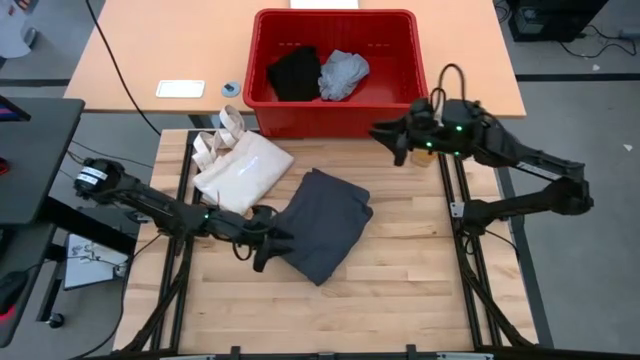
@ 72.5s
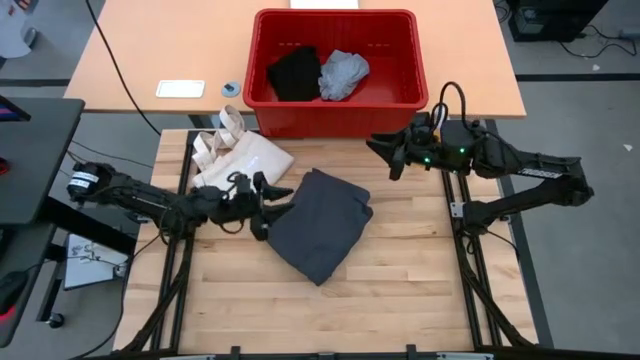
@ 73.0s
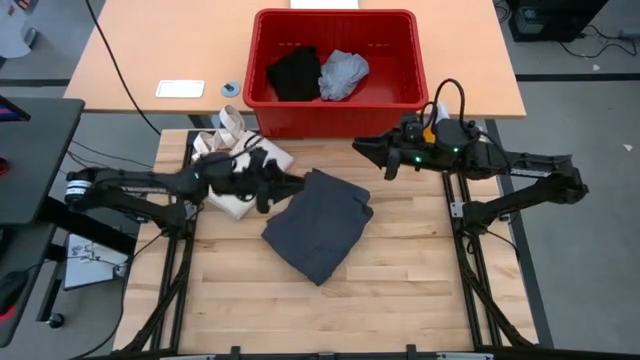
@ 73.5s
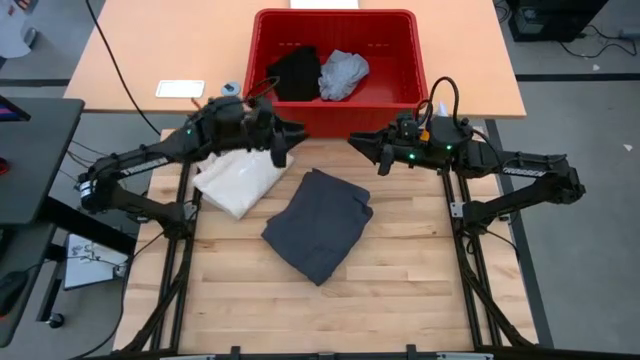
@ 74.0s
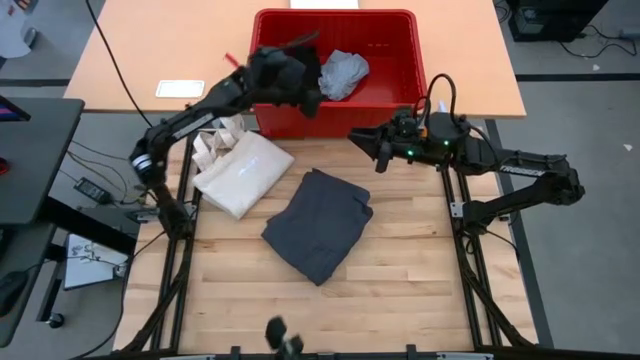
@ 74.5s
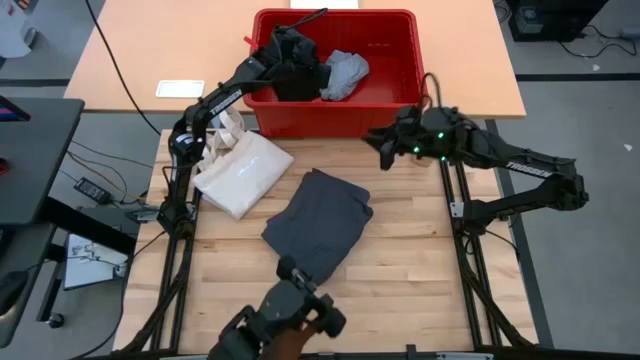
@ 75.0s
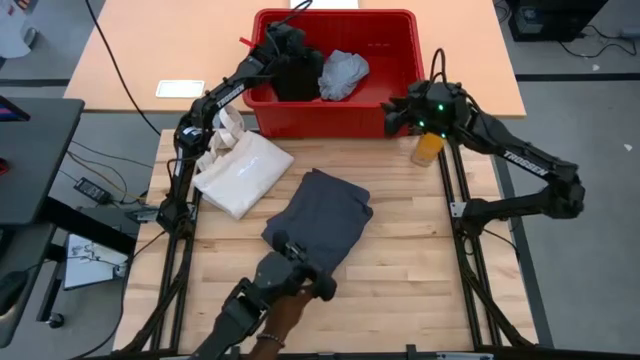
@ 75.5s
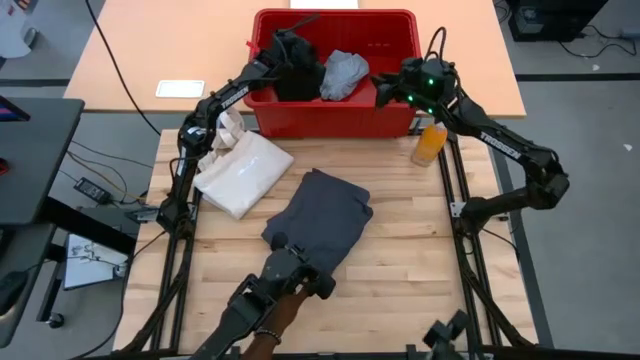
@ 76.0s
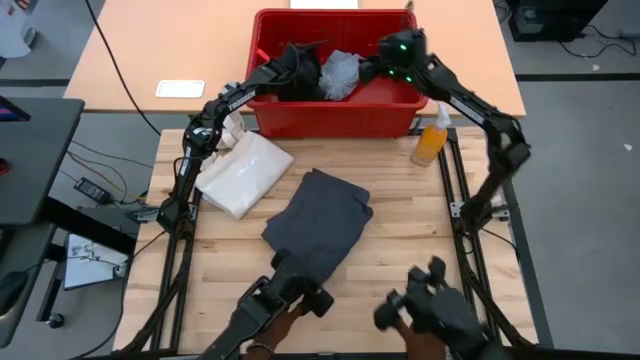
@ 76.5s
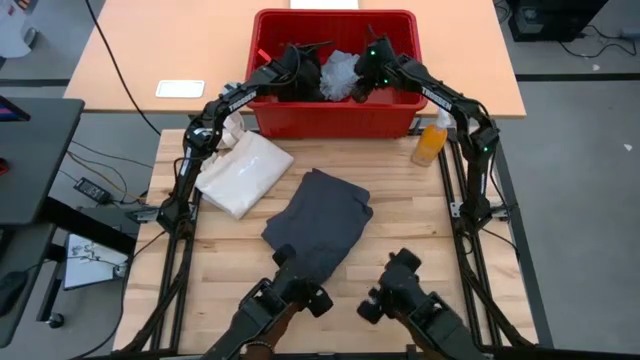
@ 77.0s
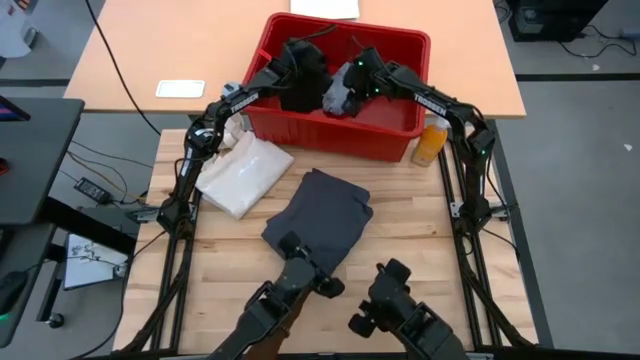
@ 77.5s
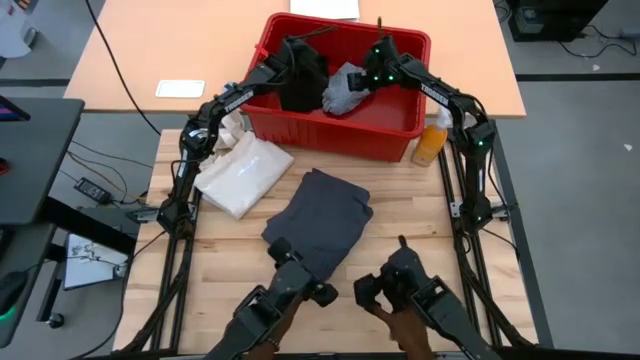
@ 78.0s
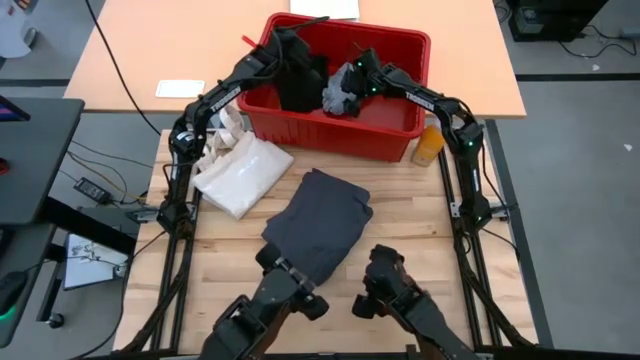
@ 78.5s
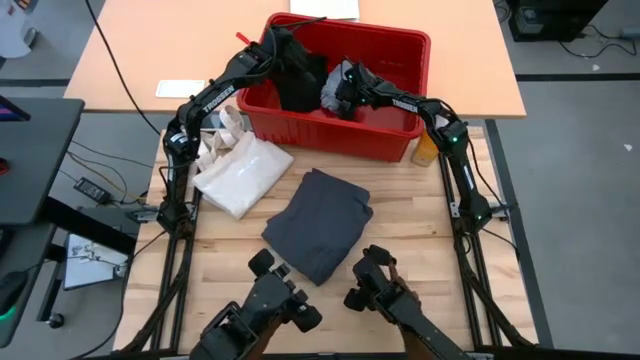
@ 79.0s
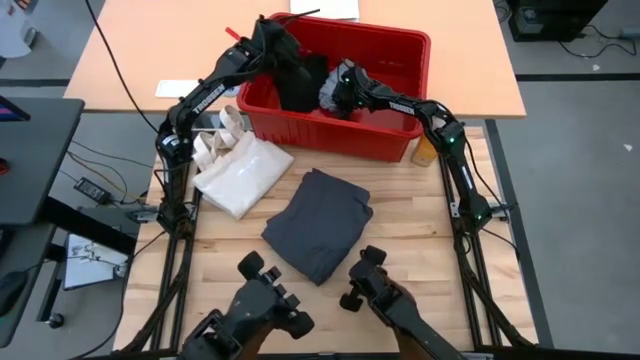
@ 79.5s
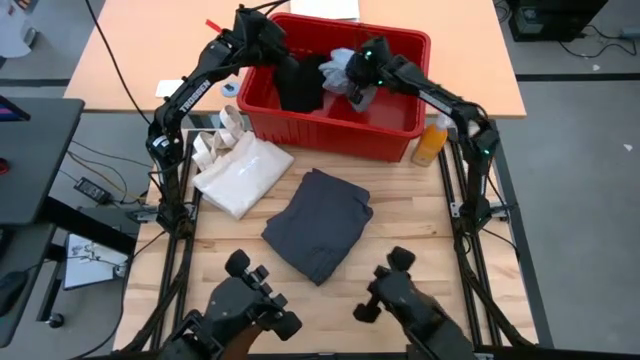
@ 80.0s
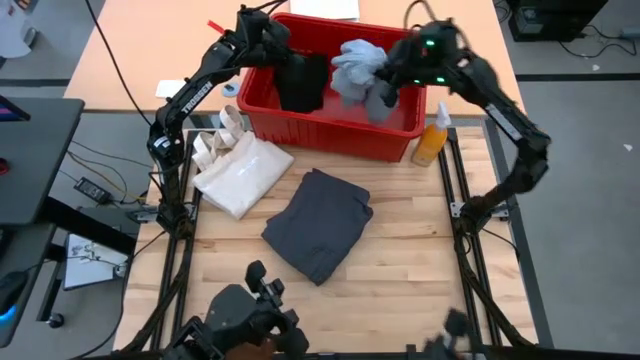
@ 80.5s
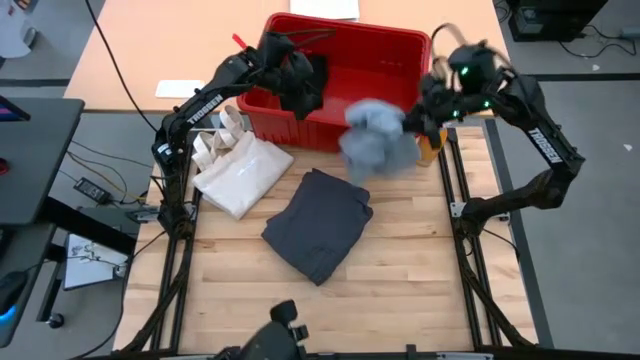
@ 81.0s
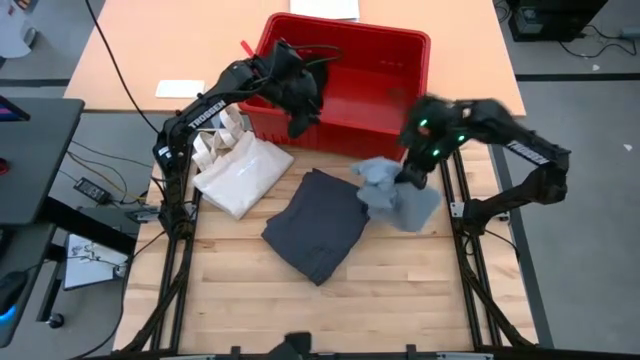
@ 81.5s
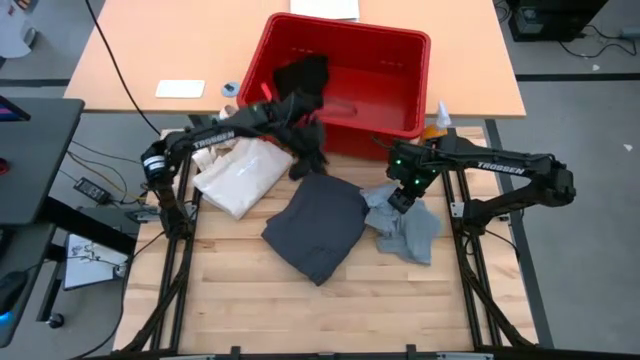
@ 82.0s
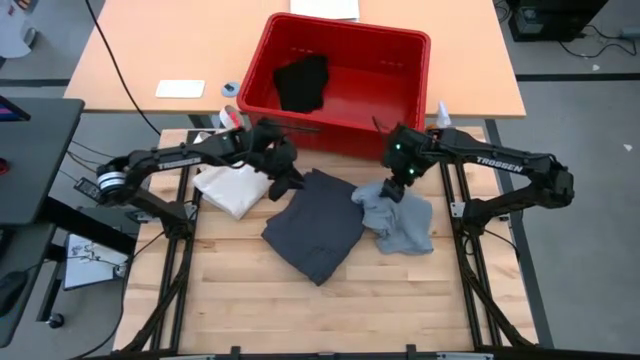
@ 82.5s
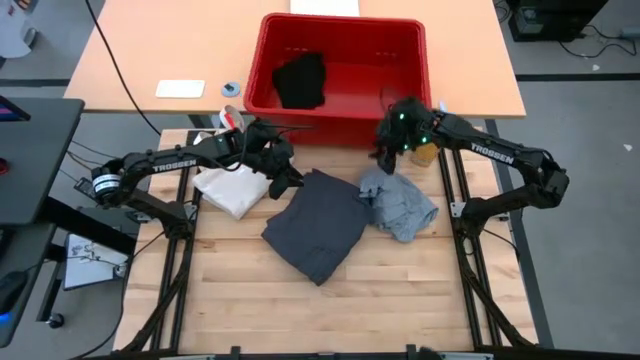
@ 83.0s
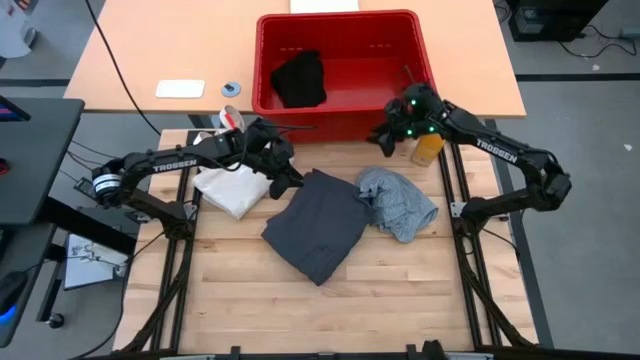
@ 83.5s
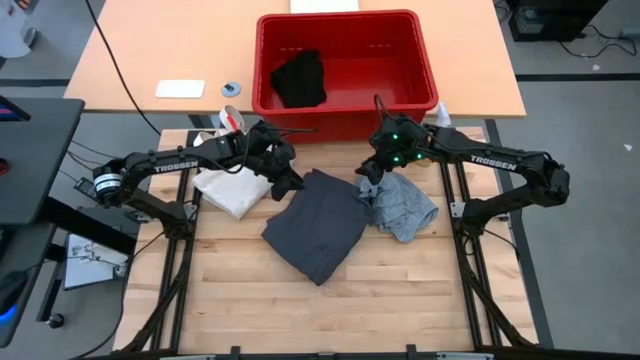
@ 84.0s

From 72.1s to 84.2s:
Task: Fold Laundry from Bin
Remove the light gray t-shirt from the red organizer bin

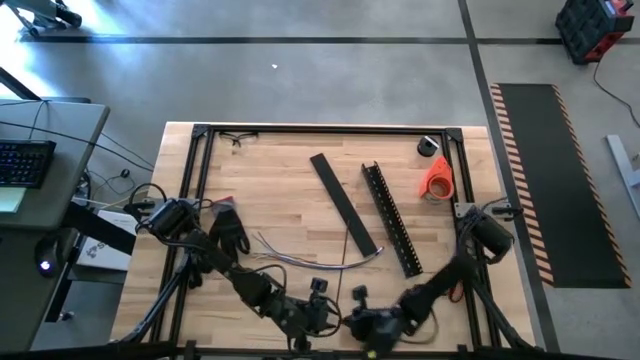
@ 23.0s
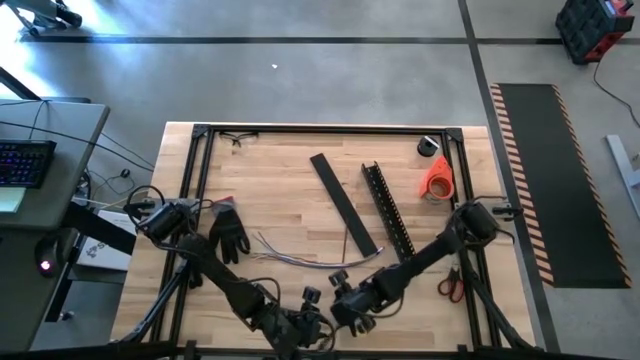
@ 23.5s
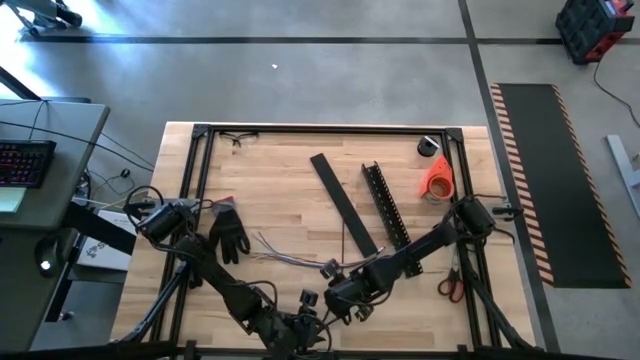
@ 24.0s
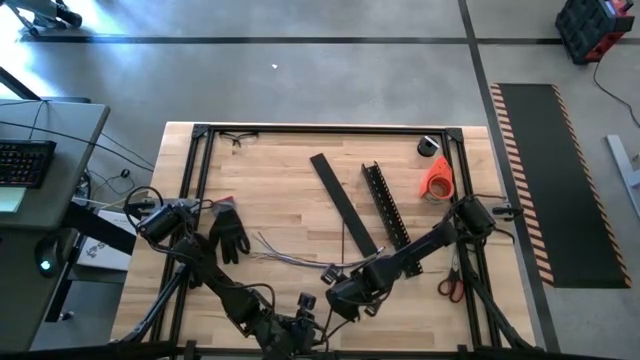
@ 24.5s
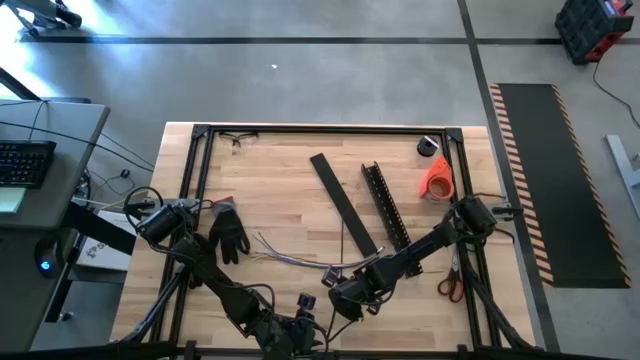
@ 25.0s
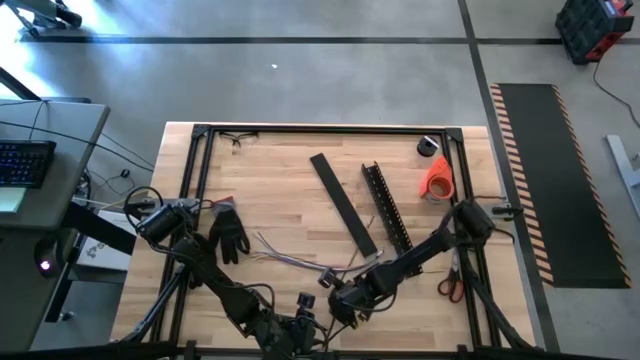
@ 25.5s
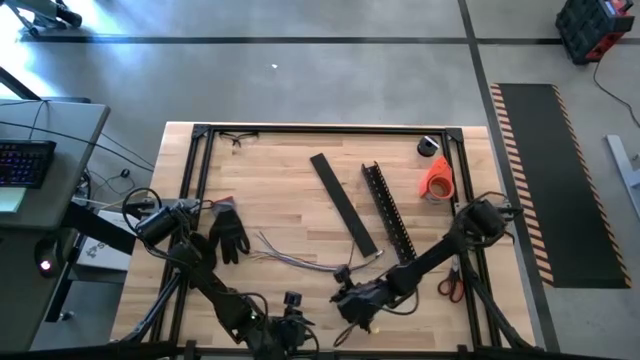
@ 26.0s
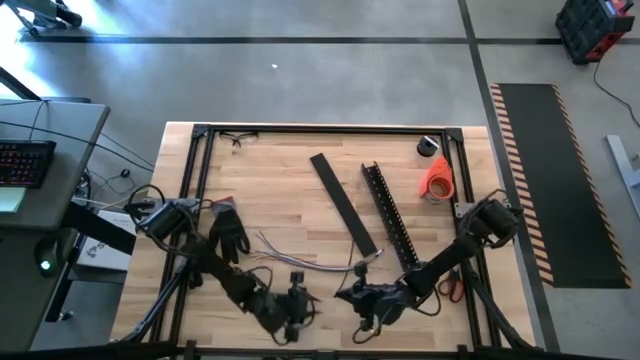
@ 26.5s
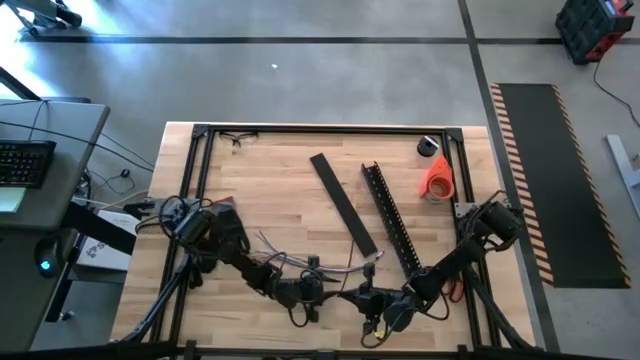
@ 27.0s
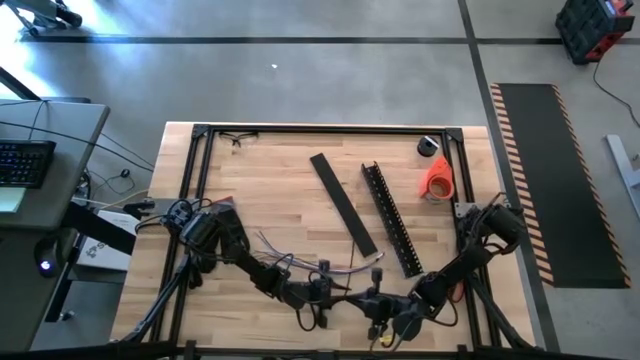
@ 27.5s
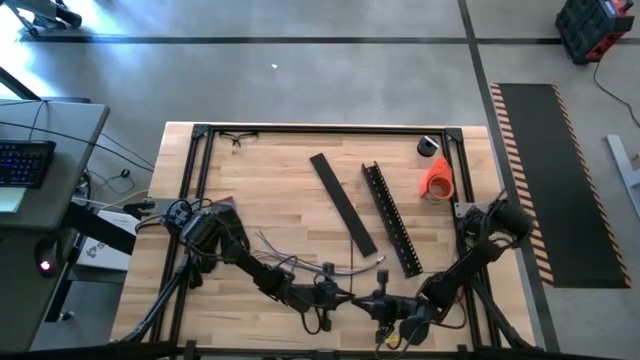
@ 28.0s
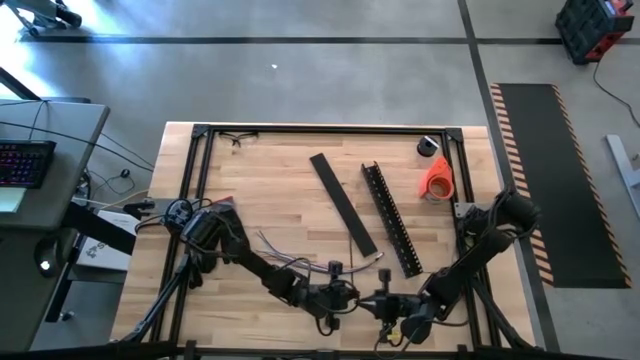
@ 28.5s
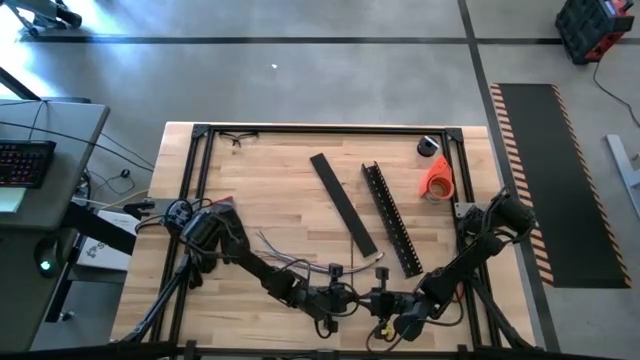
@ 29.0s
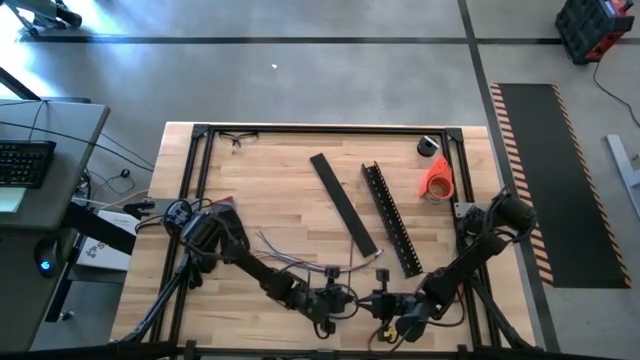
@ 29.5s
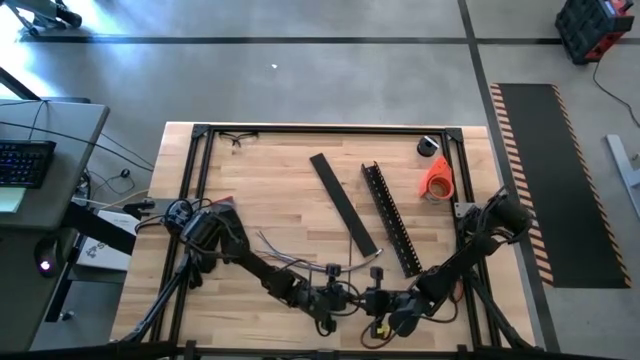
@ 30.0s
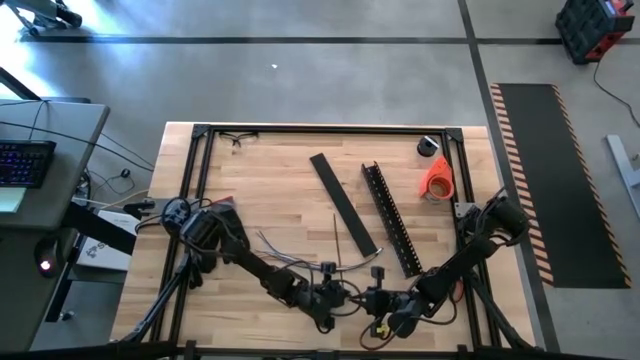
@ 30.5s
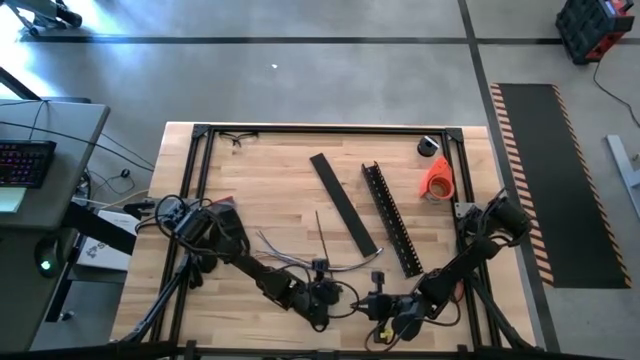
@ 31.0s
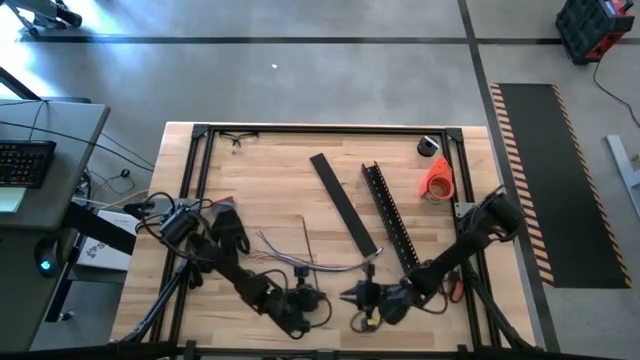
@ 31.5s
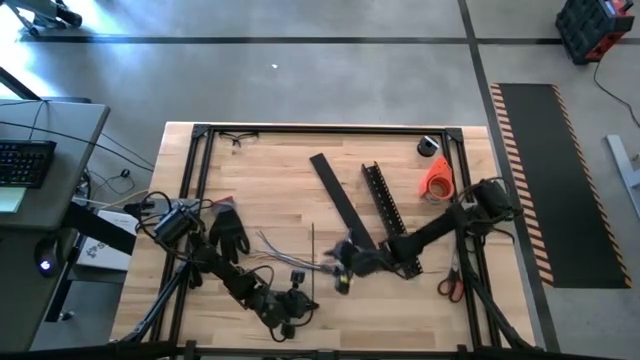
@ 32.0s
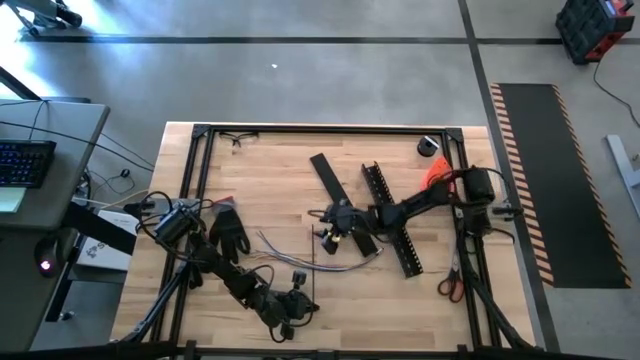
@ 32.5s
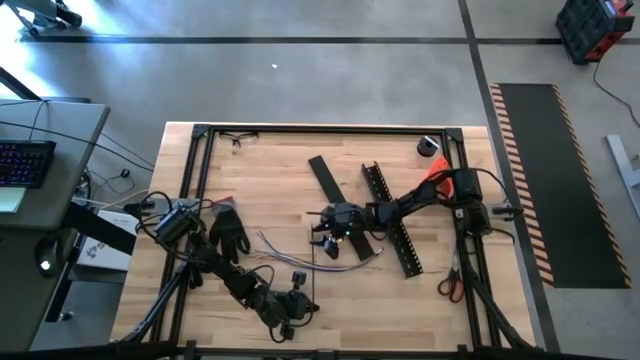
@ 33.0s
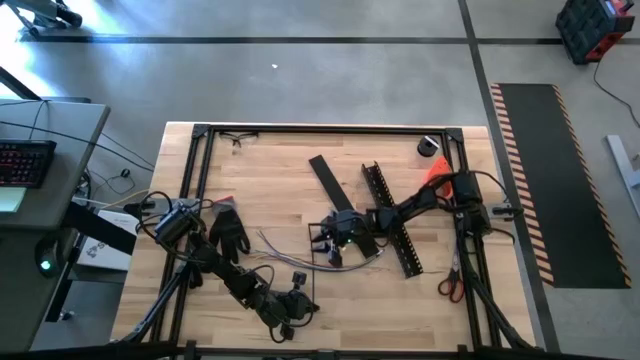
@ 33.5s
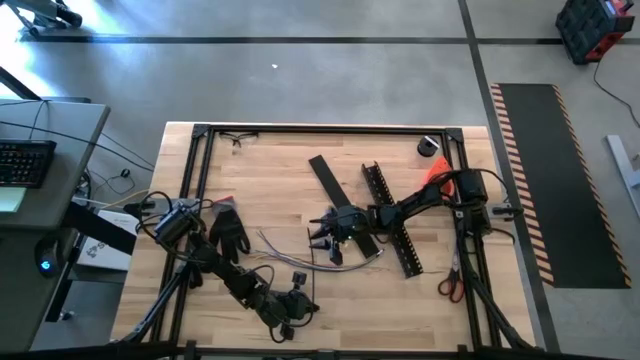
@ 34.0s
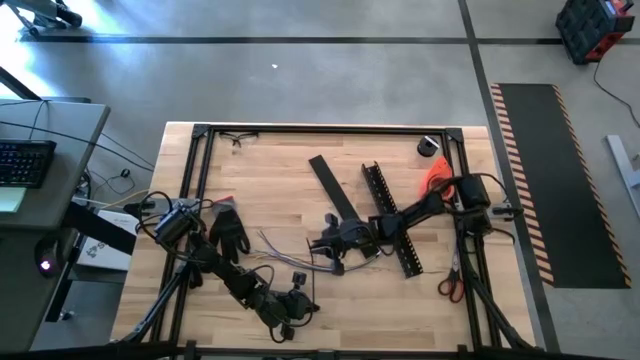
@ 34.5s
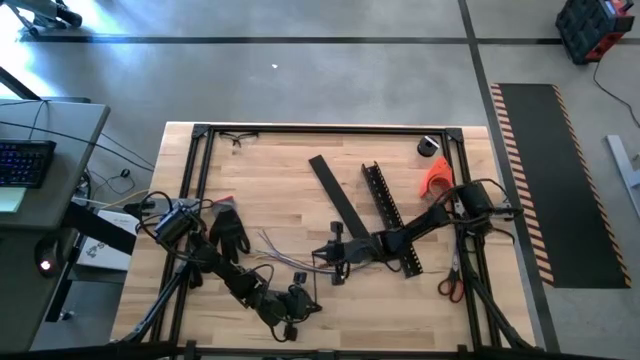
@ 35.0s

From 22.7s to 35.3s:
Task: Ziptie cables
Wrap the black zip tie on the cables
